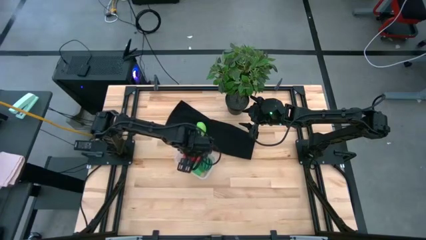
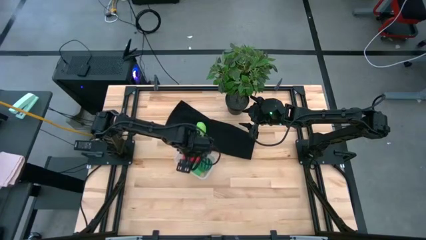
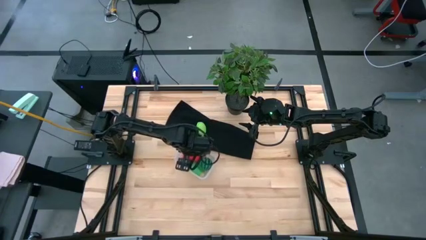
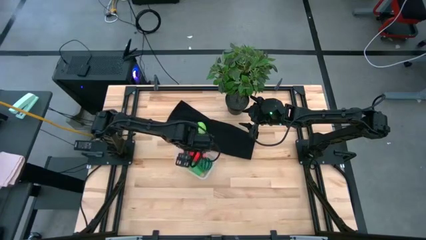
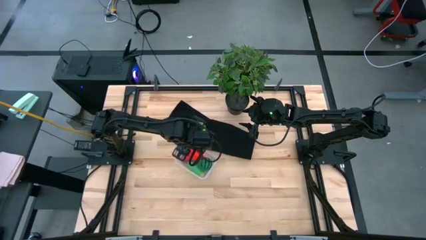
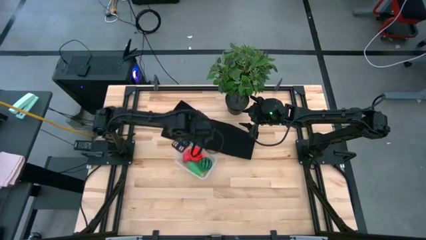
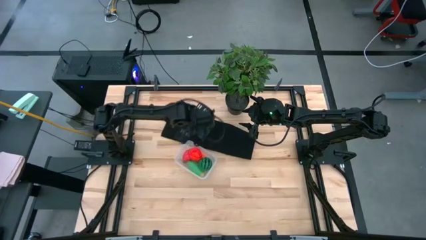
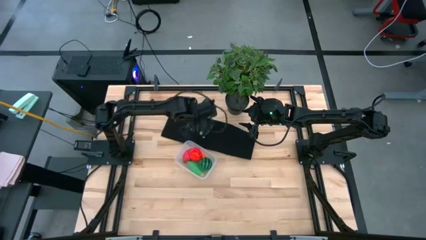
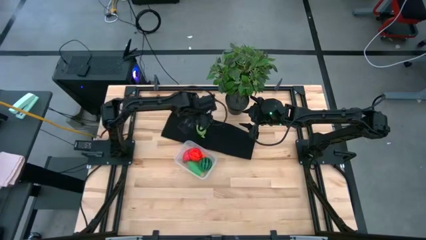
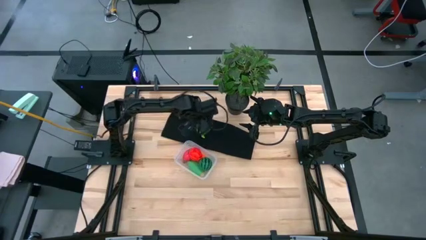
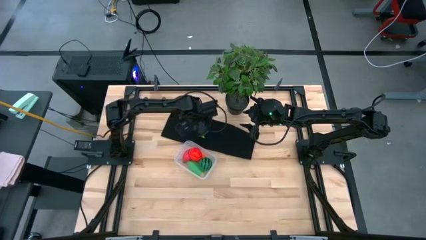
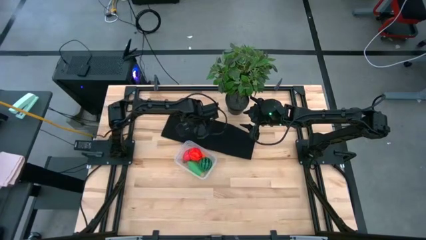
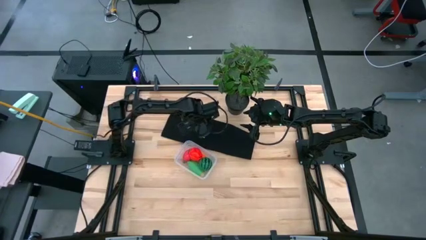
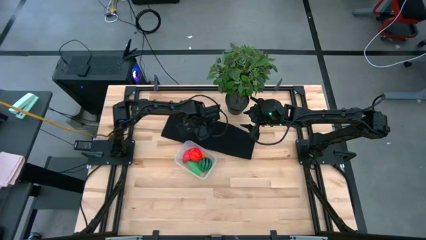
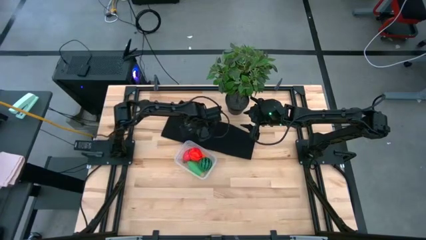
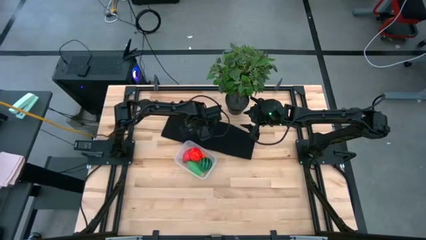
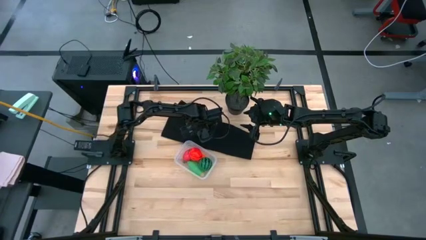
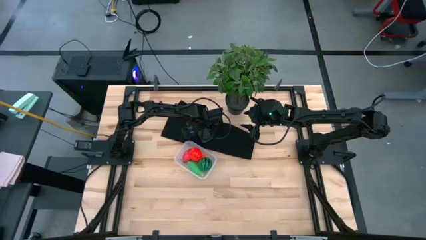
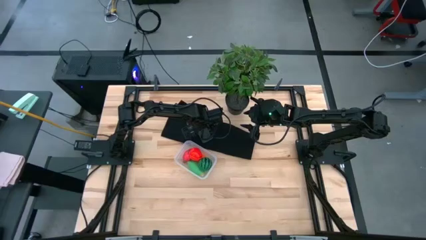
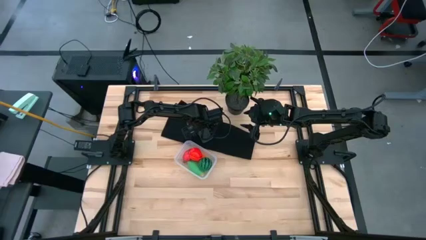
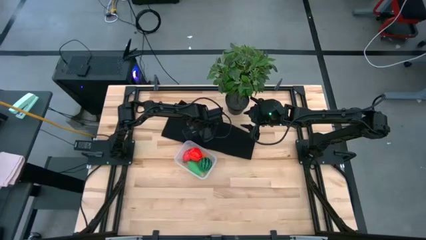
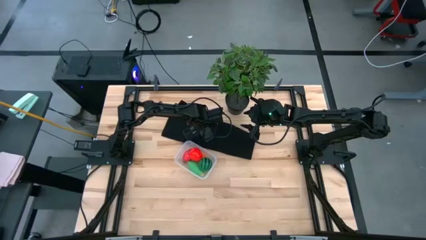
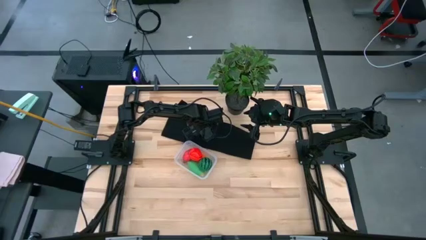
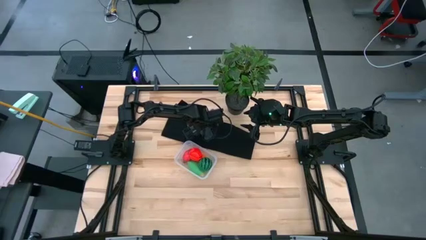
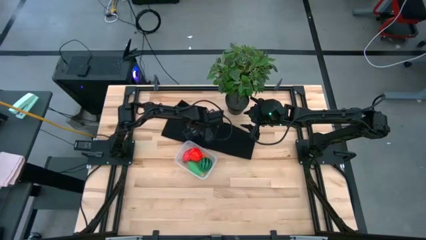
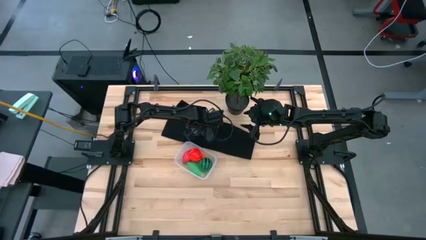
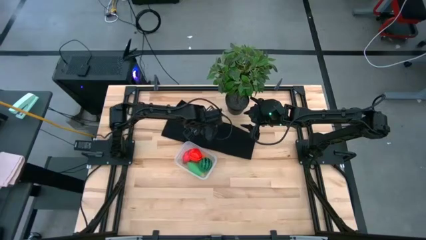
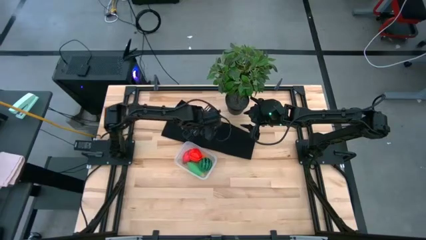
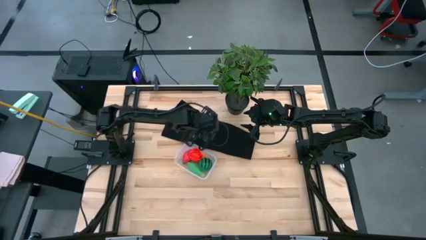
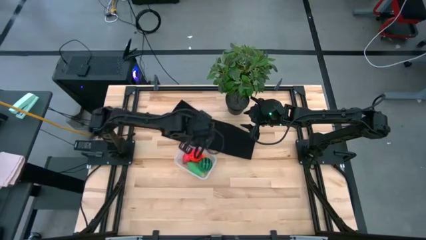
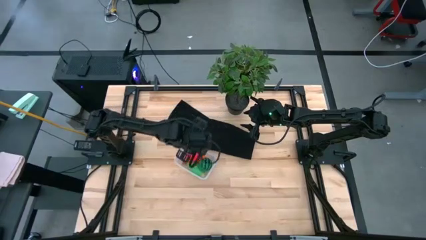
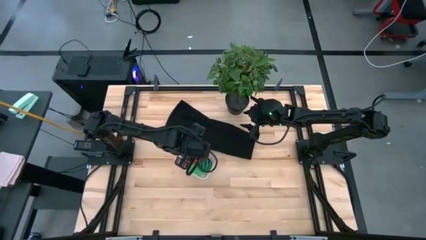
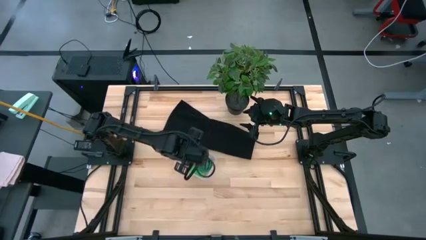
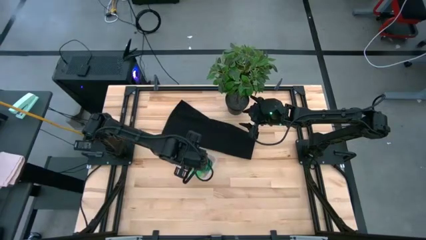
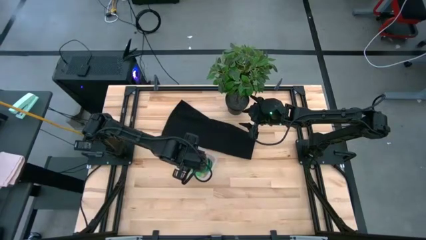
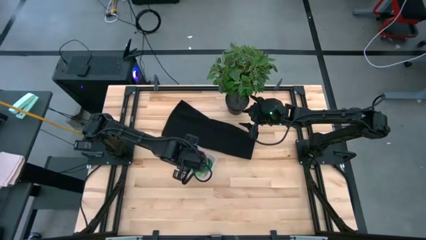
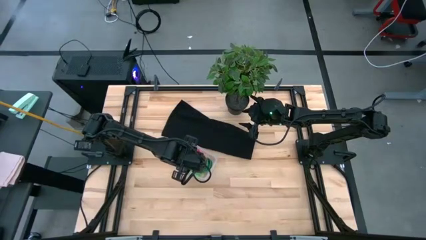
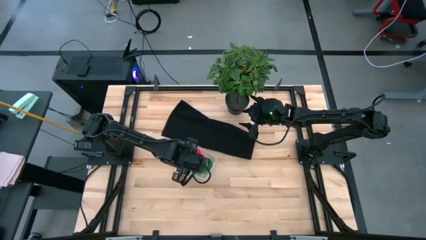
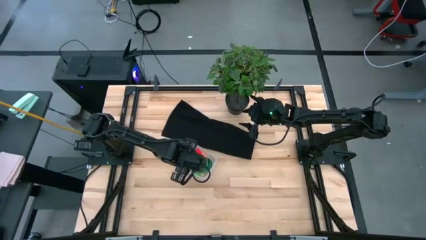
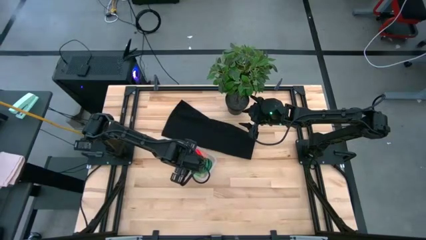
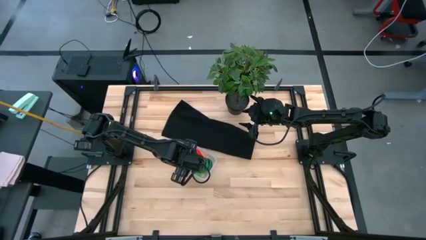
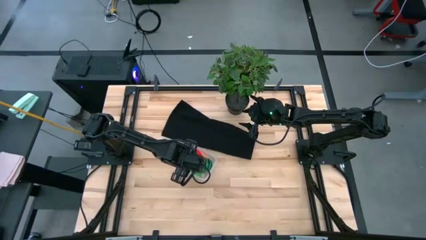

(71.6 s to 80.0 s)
Task: Pick and placing Produce into tupperware
Put the green musk melon into the transparent bin

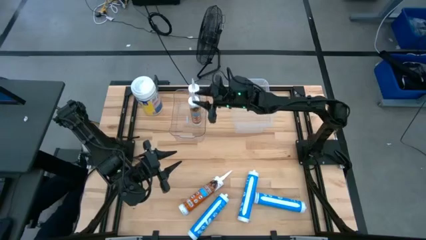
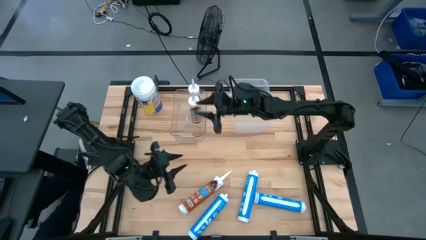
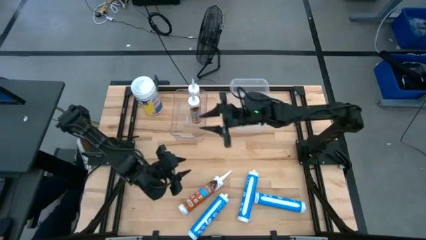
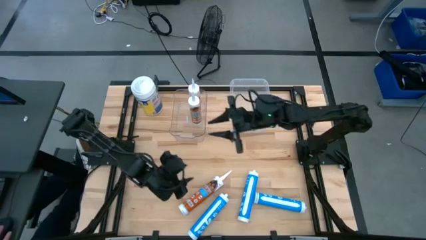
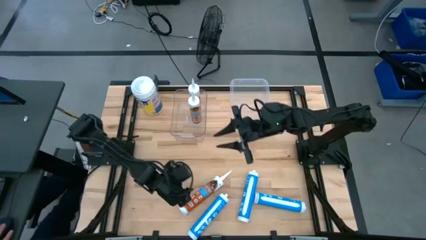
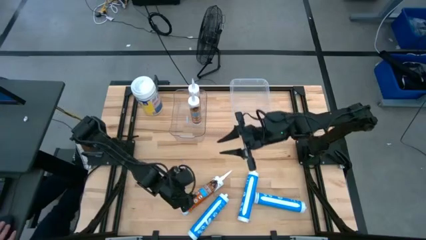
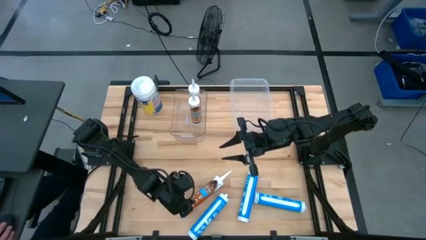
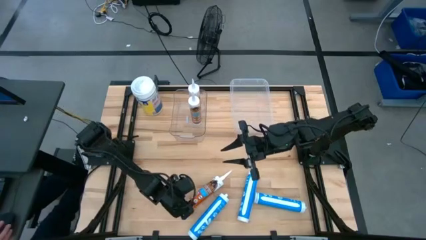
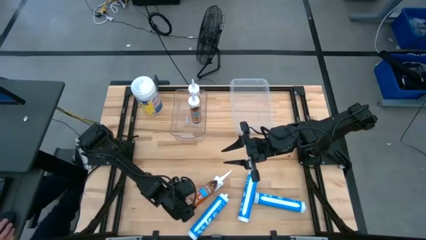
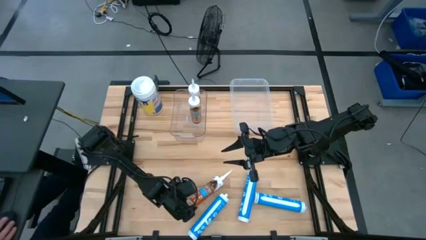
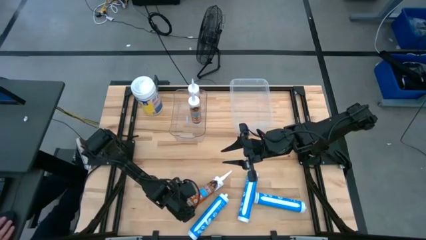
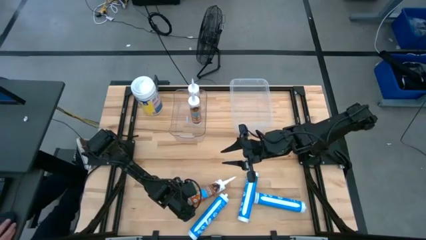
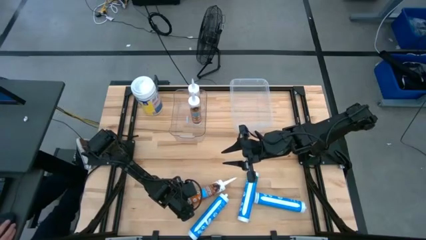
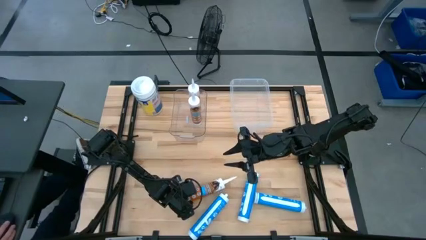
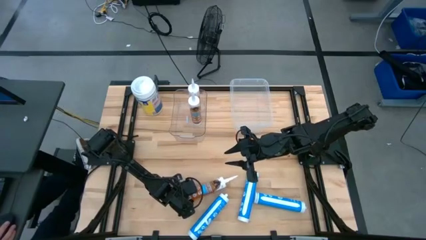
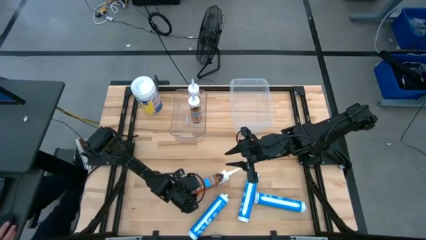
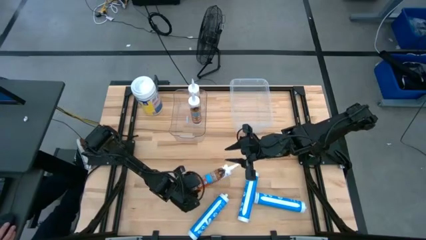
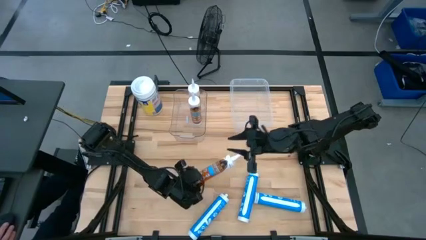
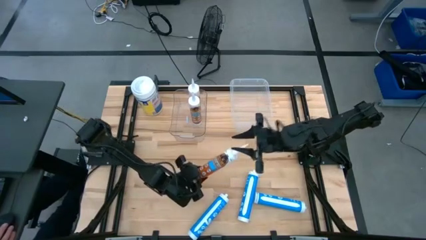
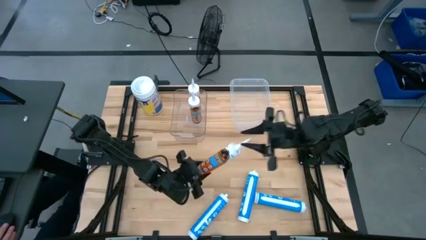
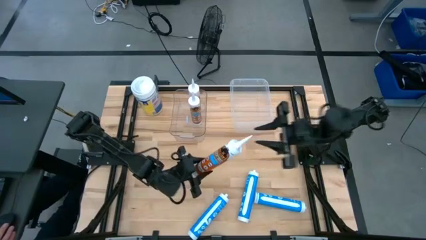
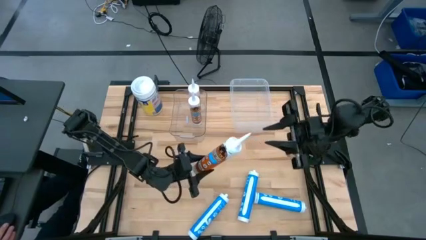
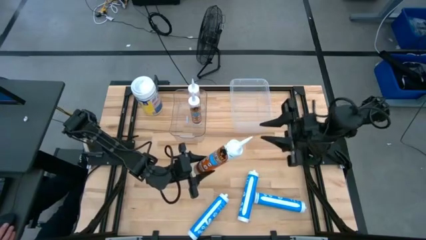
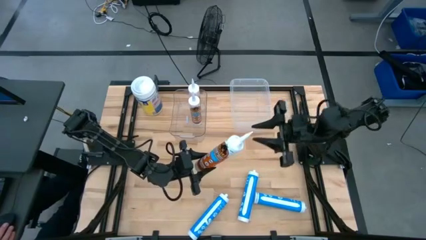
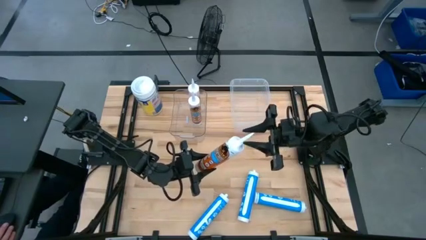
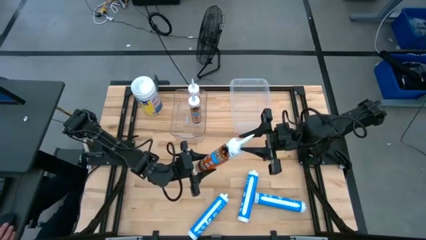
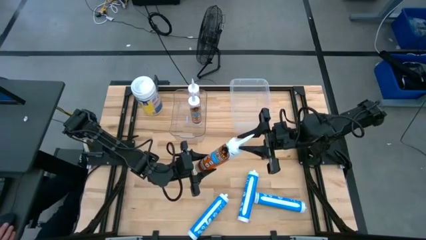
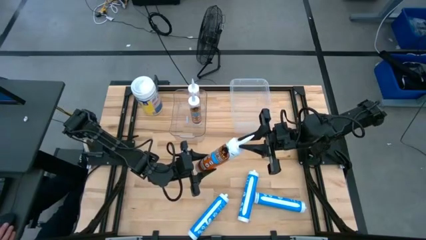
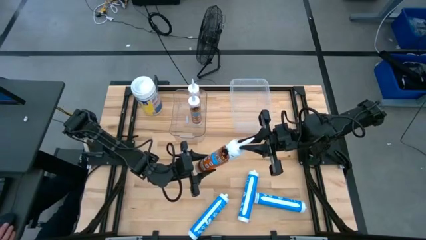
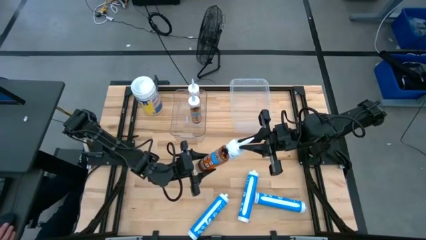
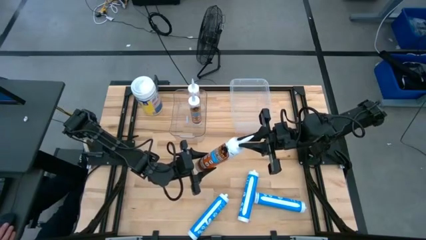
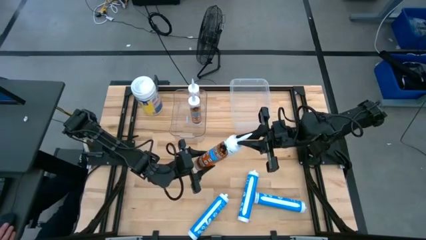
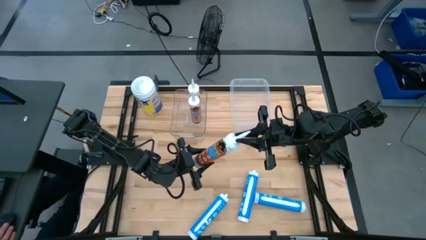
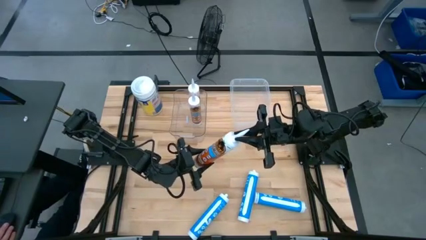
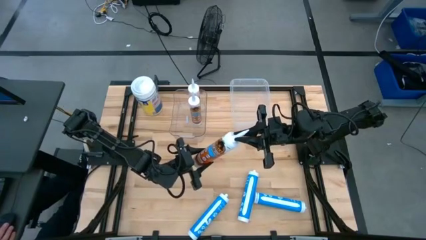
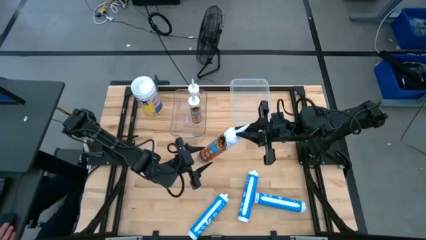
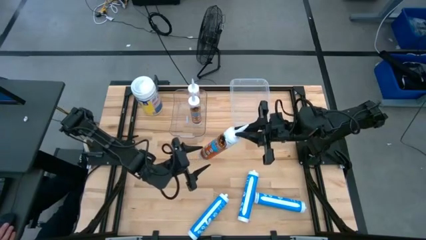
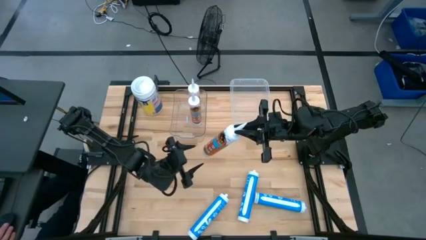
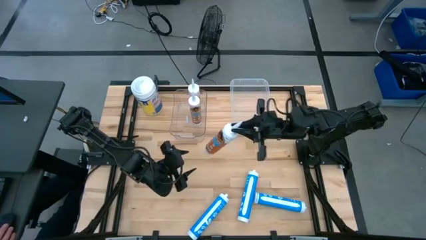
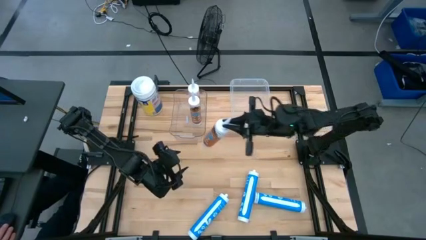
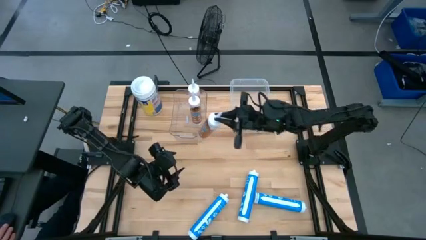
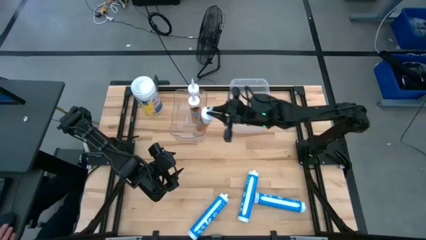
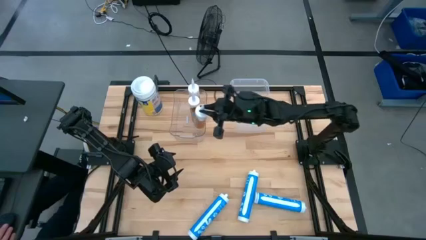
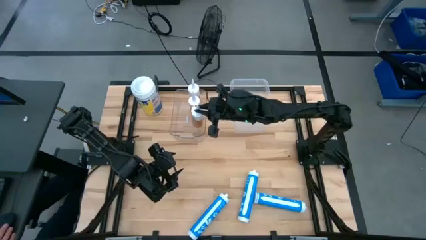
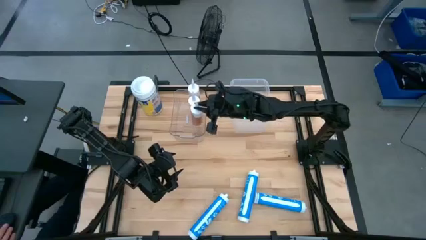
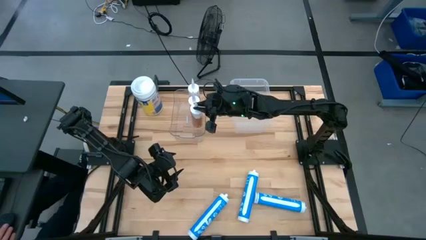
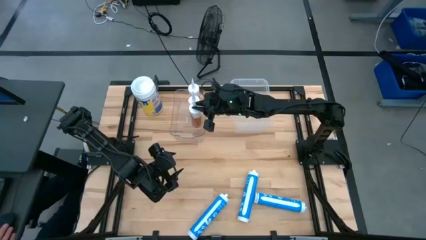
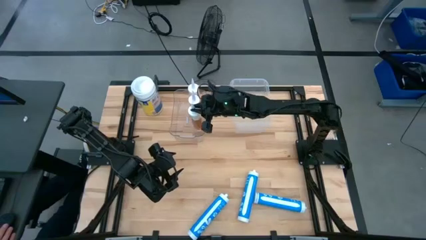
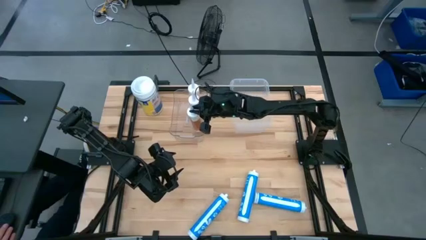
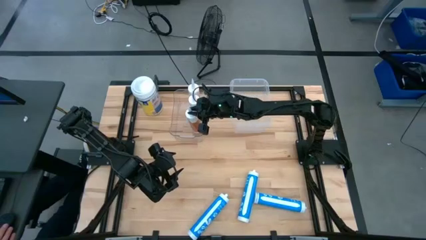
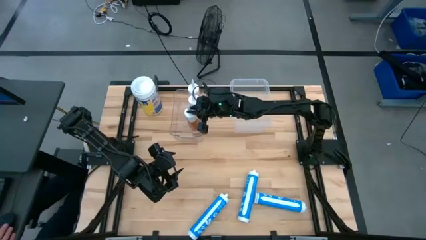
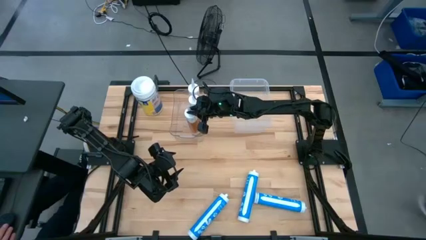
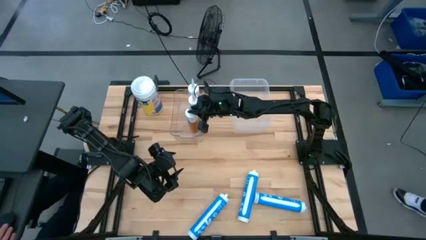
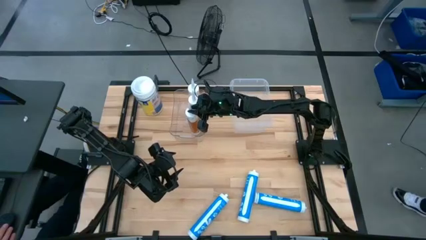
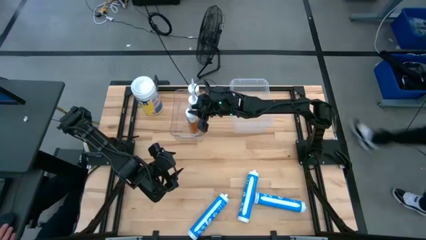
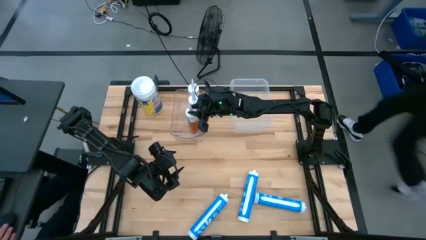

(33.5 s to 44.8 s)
Task: Pick & place silicon tubes, Sealant and Lysol wipes
Put the orange sealant into the left transparent bin
